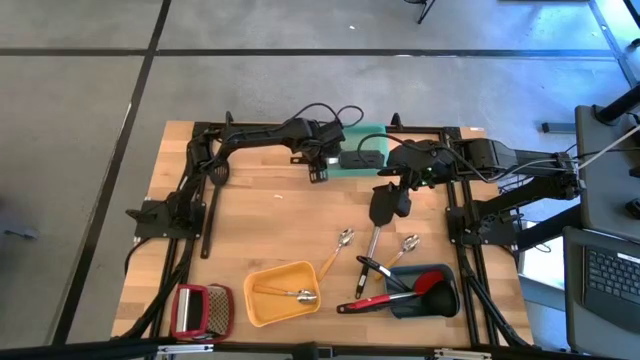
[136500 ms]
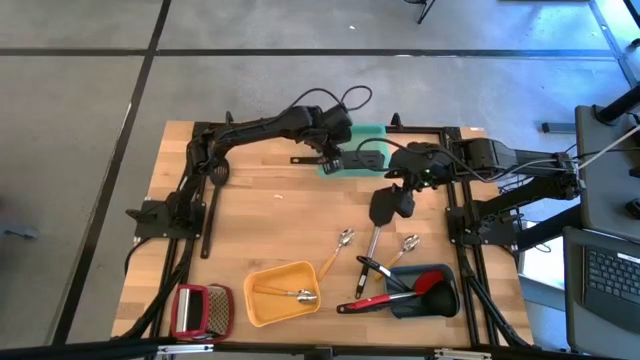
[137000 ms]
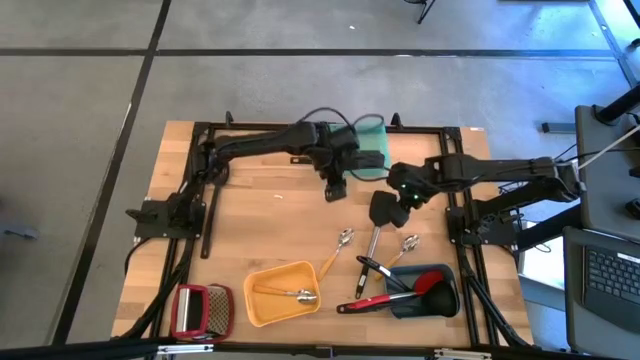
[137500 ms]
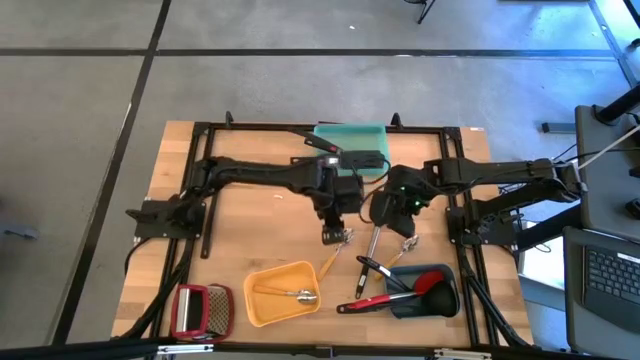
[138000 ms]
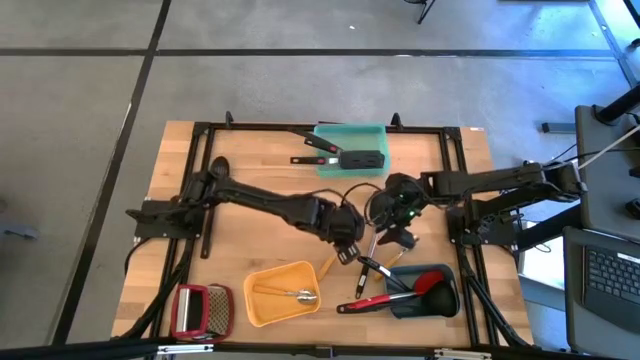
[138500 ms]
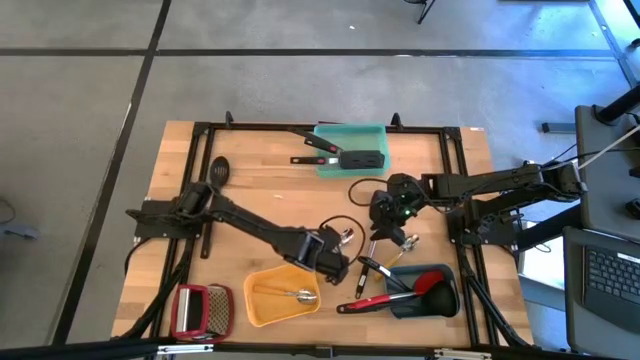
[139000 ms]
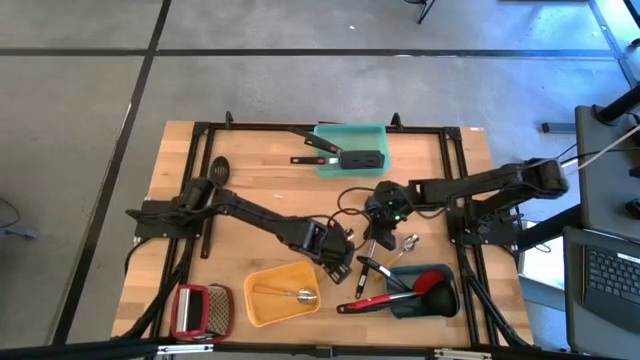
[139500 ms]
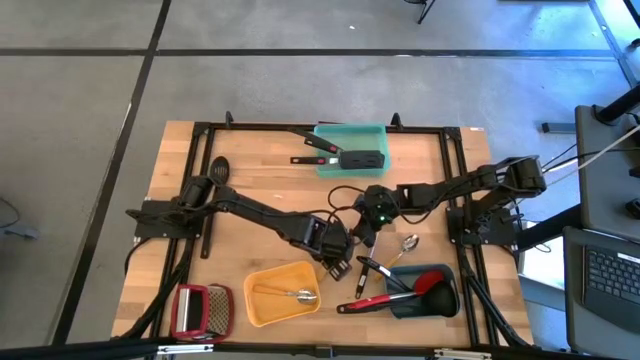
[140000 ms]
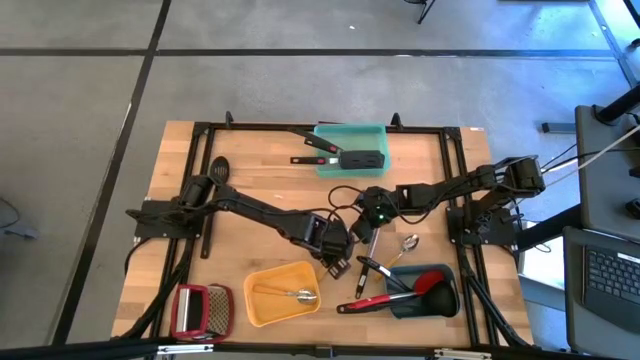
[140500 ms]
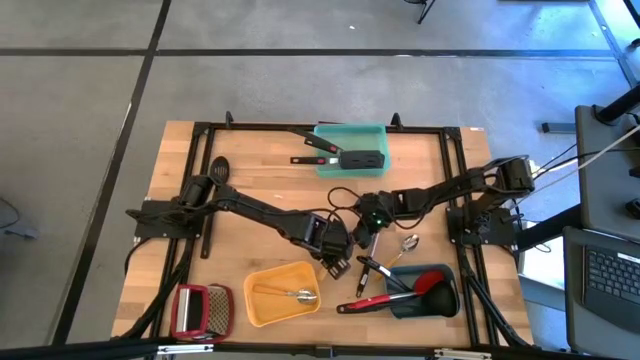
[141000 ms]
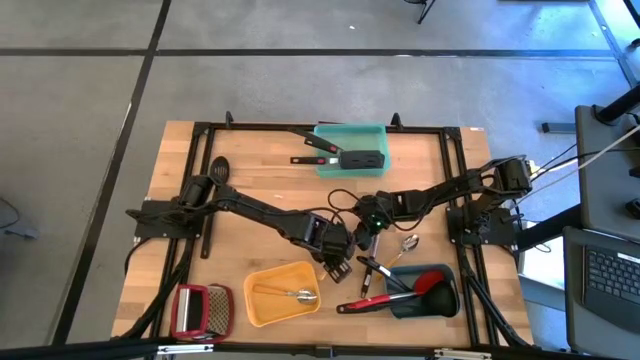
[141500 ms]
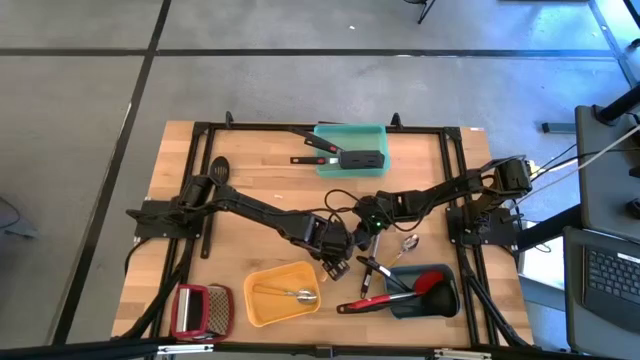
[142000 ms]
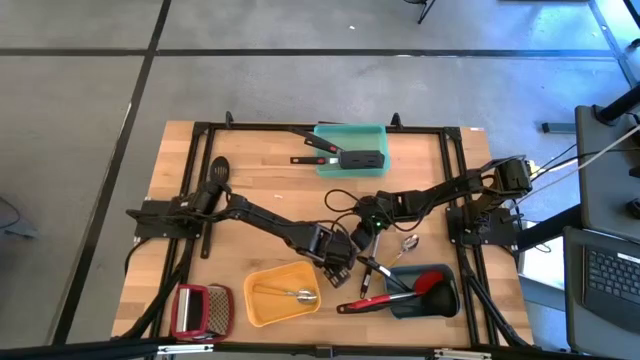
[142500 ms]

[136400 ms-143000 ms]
Task: Pick & Place Kitchen Items
Put the yellow spoon into the yellow bin

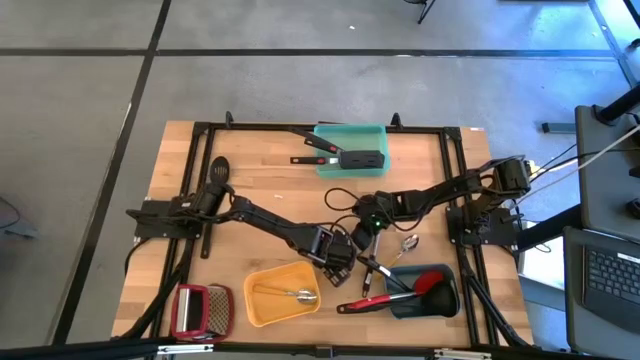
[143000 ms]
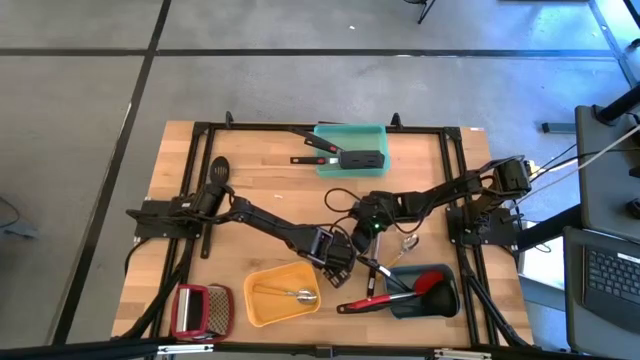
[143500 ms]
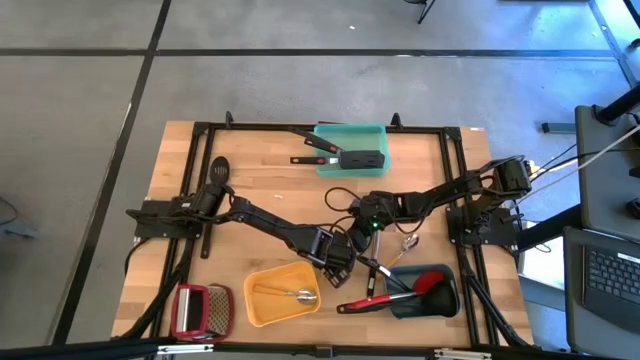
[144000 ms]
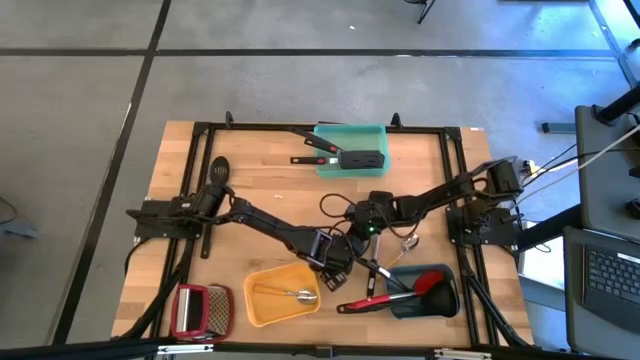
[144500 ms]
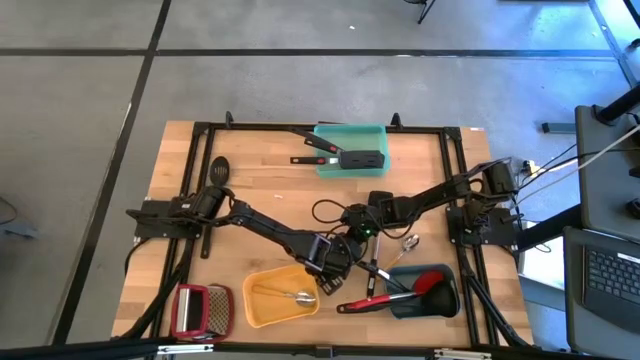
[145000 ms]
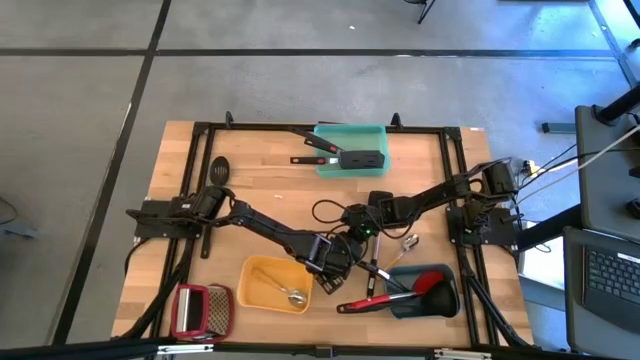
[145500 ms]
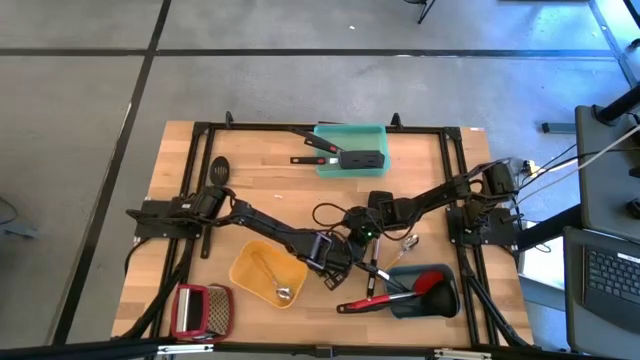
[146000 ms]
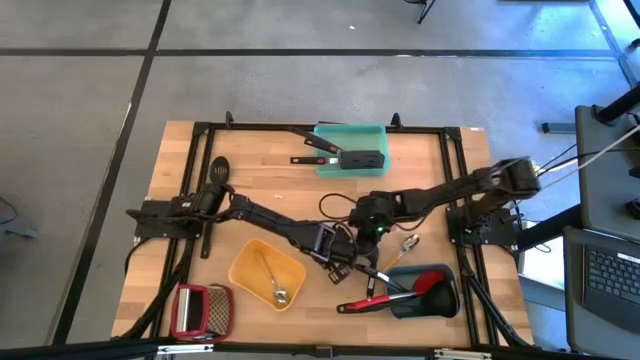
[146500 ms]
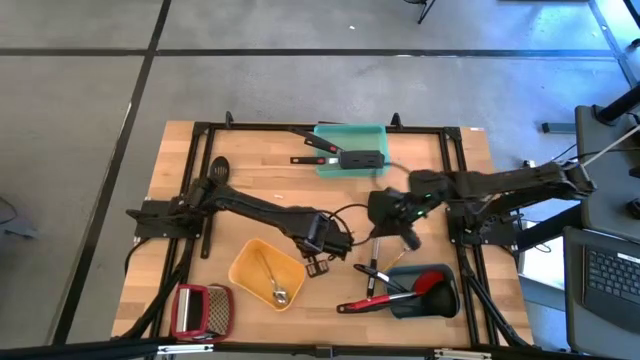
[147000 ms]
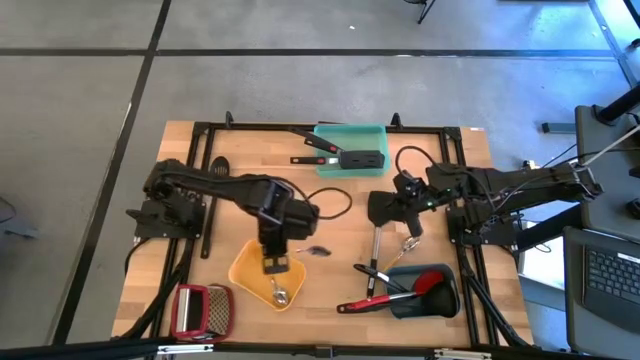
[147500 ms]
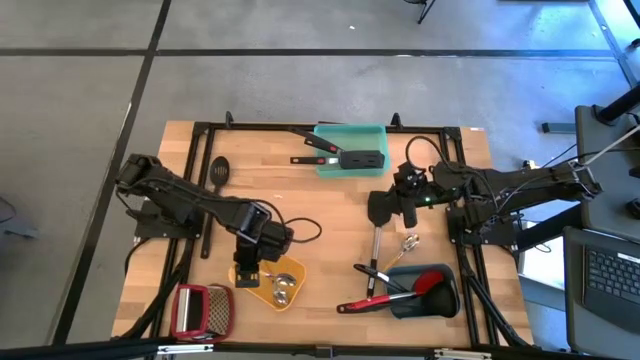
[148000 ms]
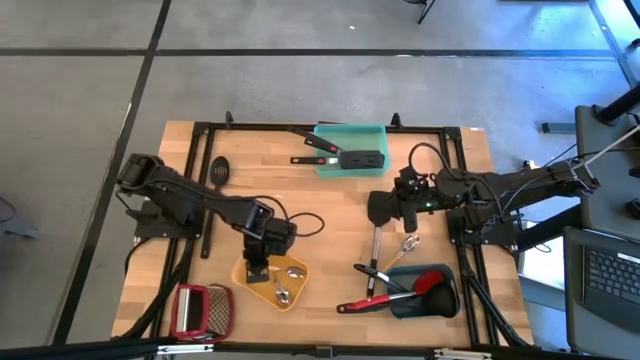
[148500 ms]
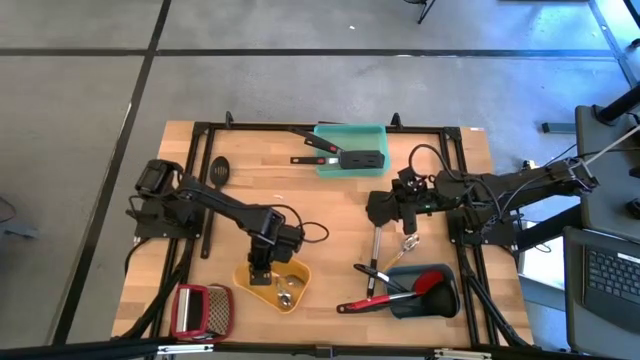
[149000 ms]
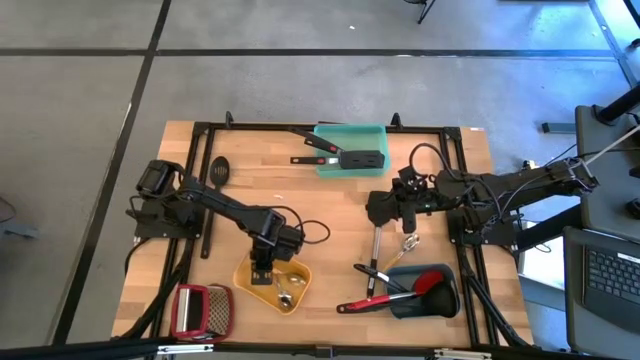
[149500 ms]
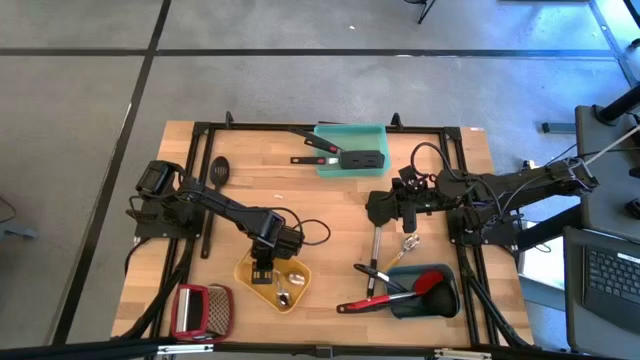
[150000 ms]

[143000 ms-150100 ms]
Put the yellow spoon into the yellow bin

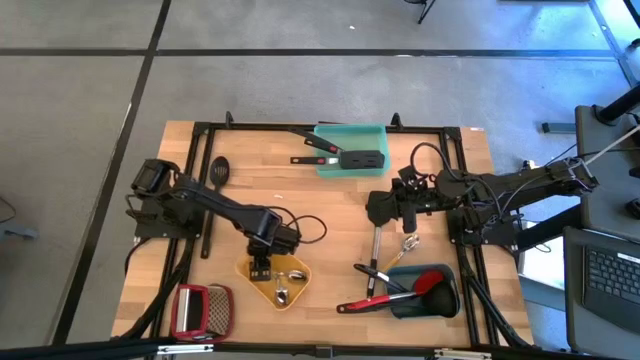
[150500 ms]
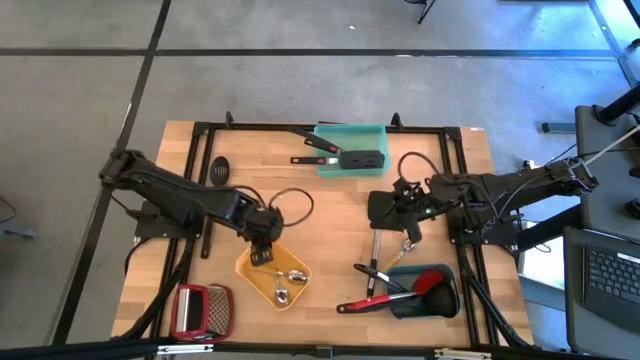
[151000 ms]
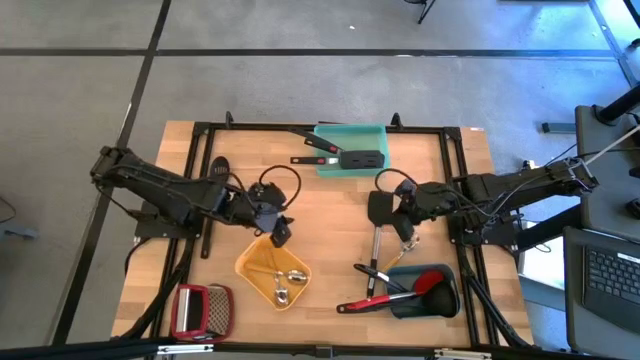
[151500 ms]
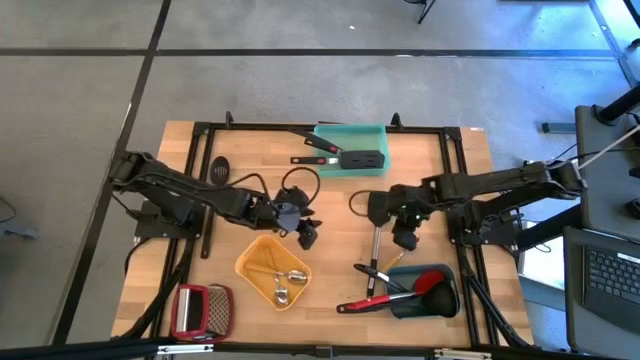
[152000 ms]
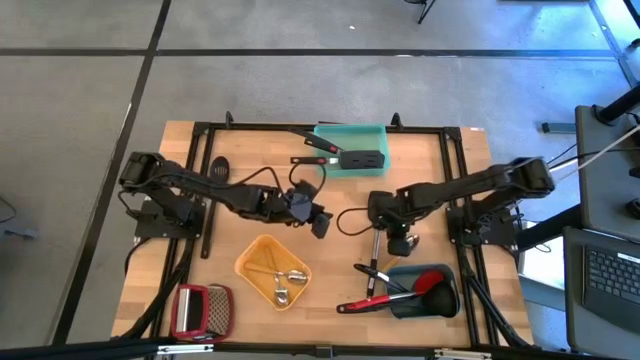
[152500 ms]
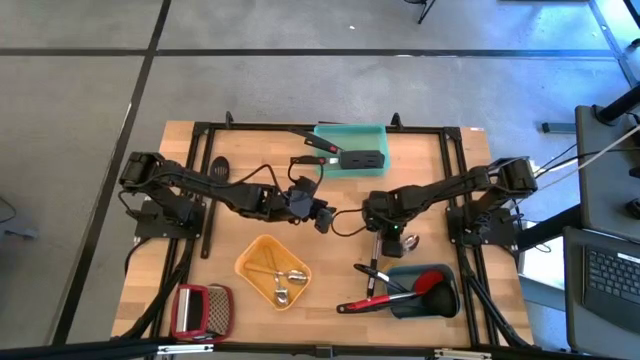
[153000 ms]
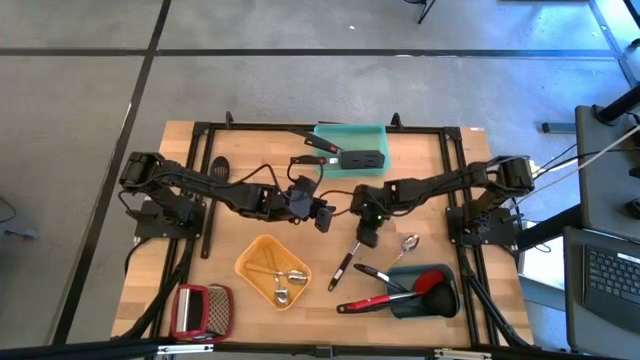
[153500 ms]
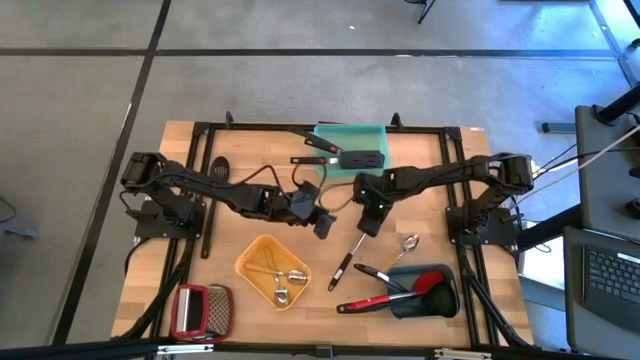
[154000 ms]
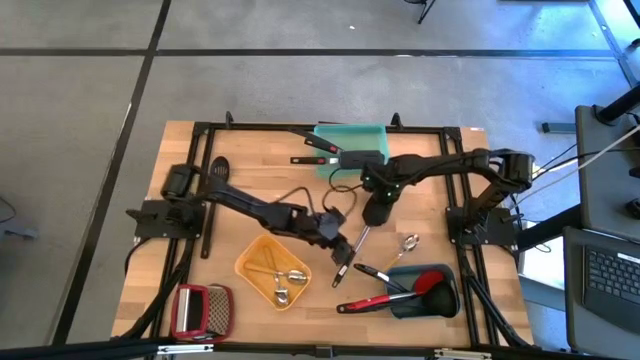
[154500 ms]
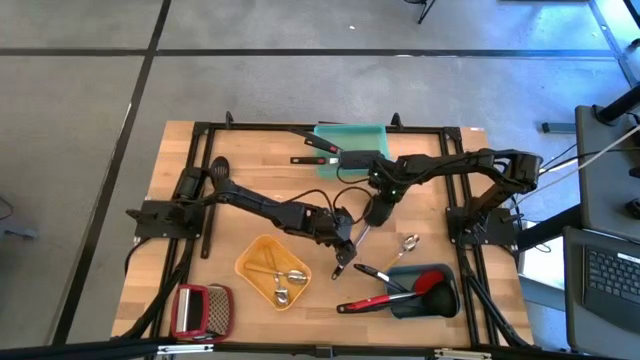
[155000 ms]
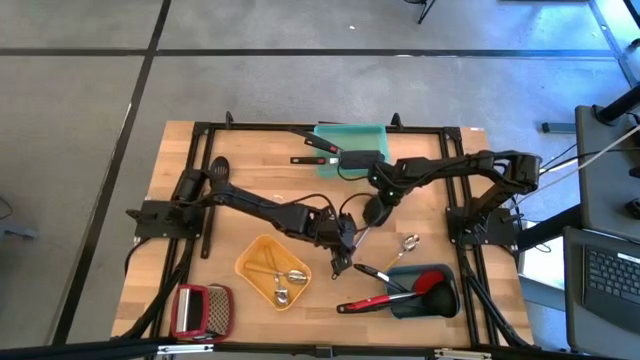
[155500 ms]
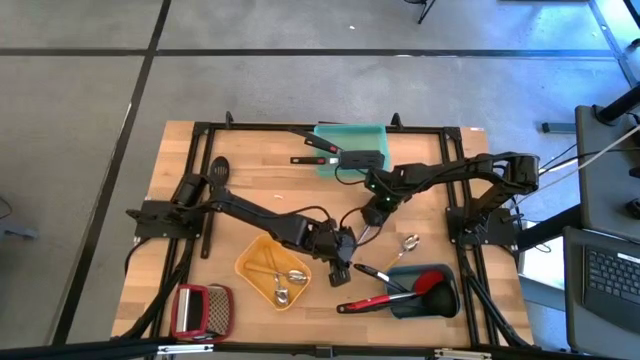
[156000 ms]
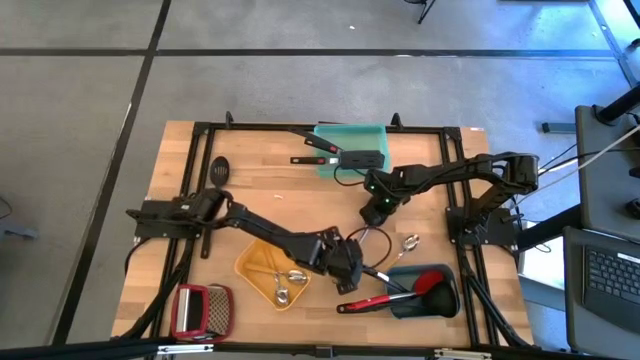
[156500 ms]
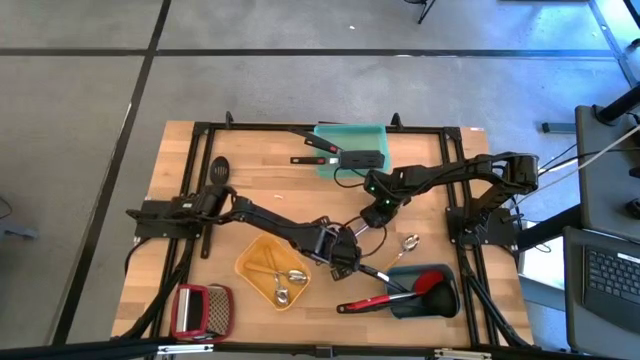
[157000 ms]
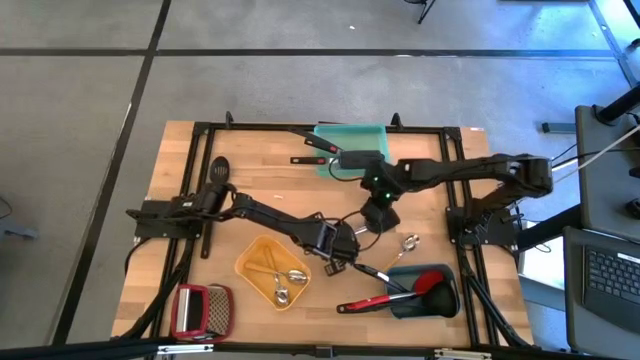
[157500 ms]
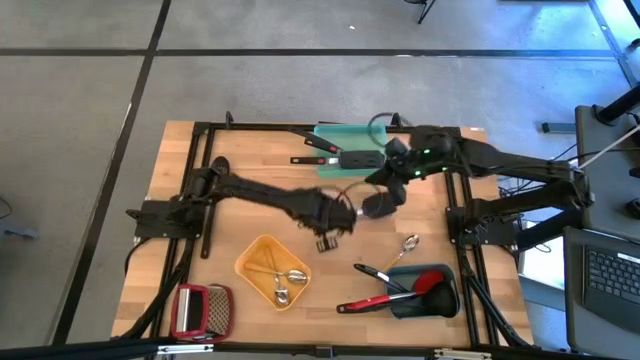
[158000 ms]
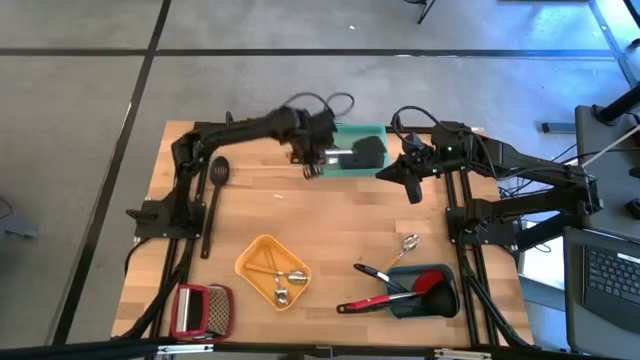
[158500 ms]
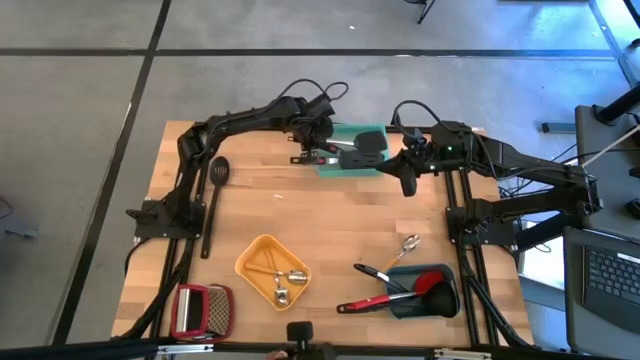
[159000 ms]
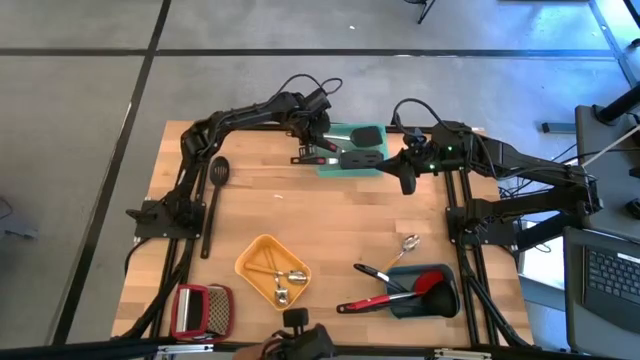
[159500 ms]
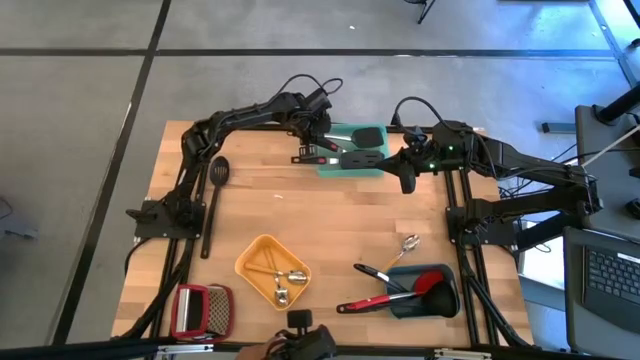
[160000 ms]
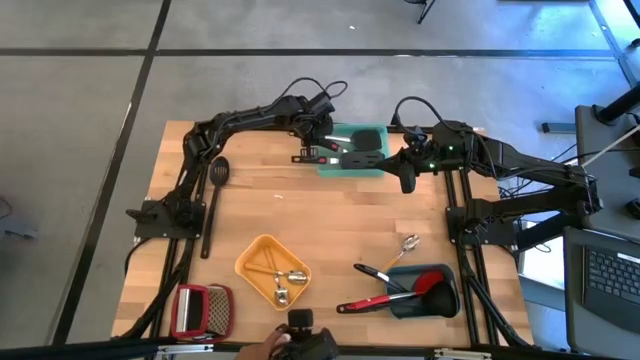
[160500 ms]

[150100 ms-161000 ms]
Put the black spatula into the green bin
